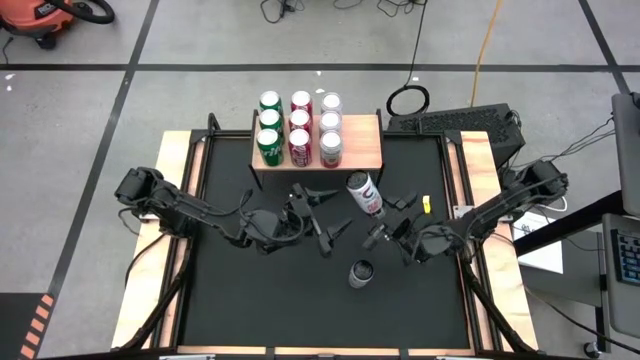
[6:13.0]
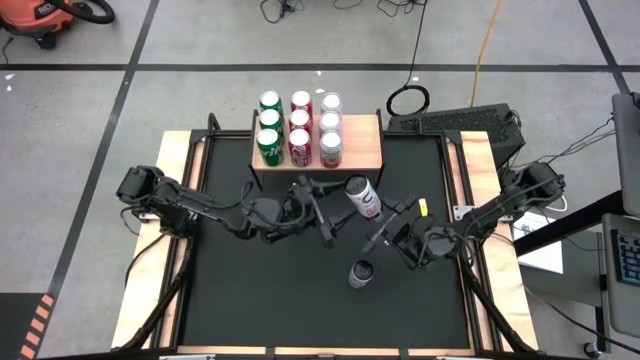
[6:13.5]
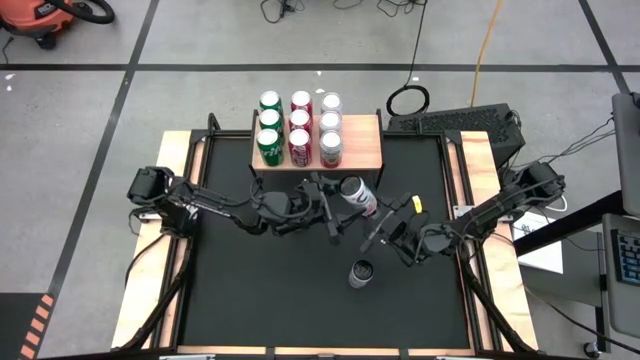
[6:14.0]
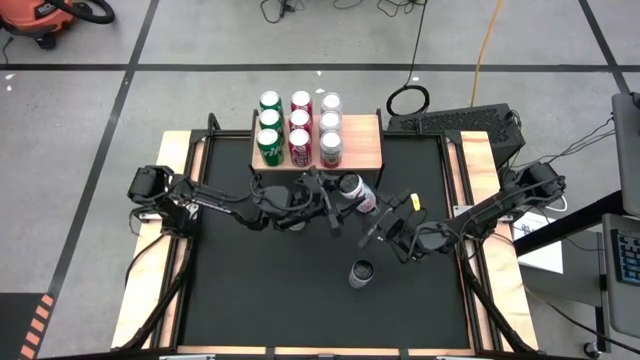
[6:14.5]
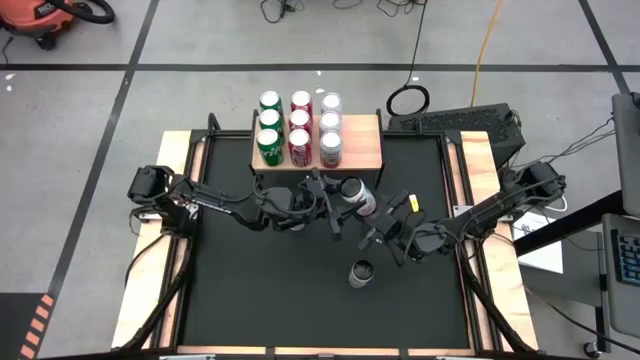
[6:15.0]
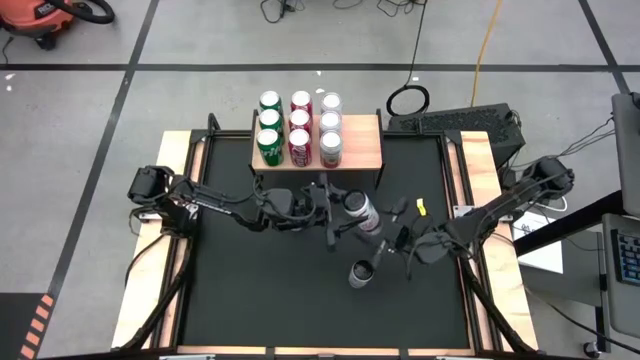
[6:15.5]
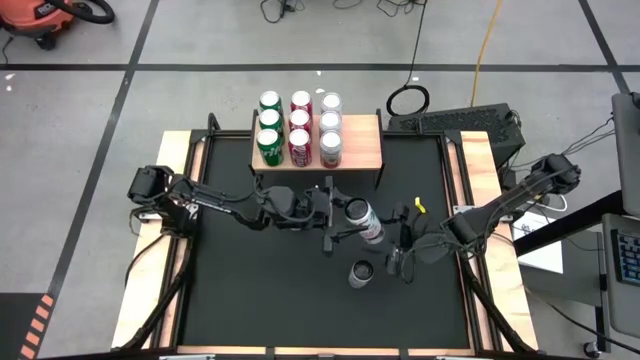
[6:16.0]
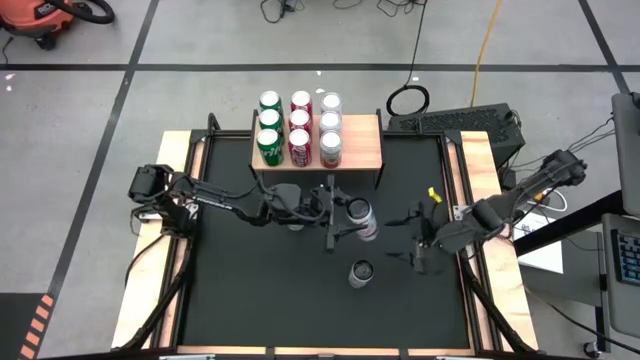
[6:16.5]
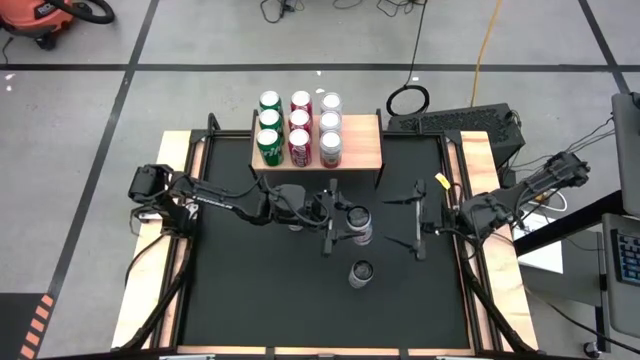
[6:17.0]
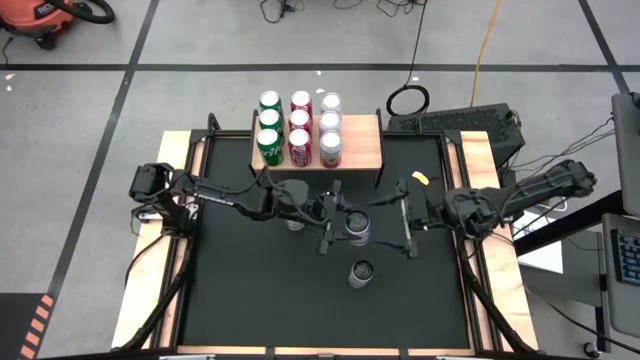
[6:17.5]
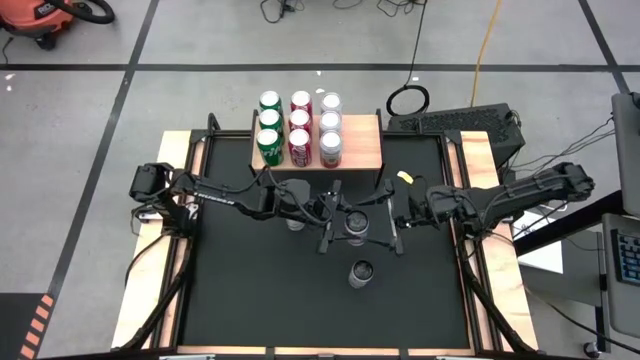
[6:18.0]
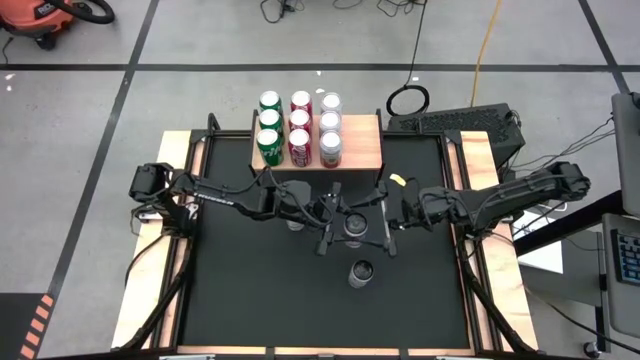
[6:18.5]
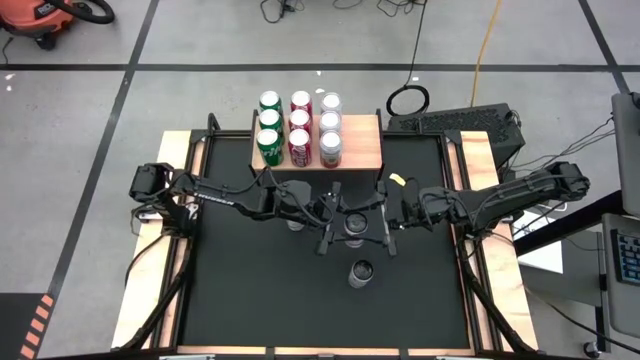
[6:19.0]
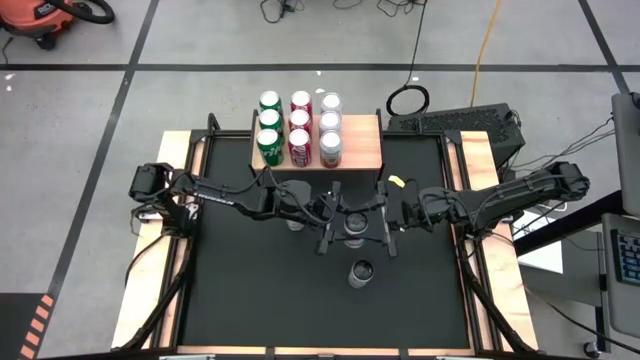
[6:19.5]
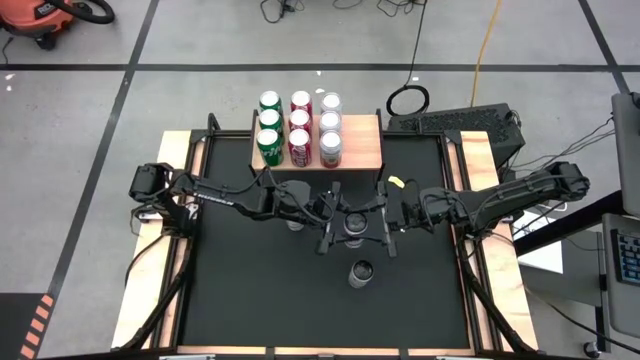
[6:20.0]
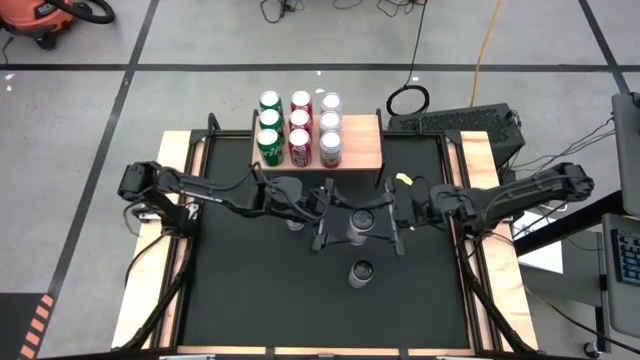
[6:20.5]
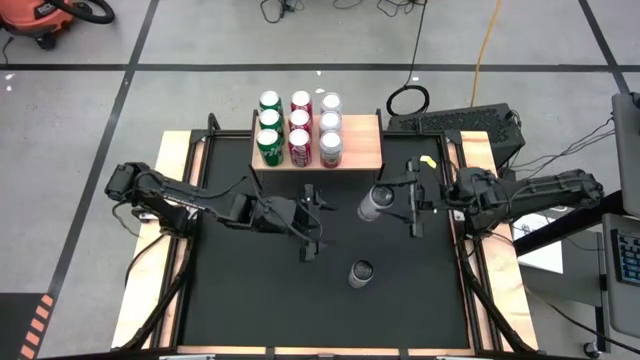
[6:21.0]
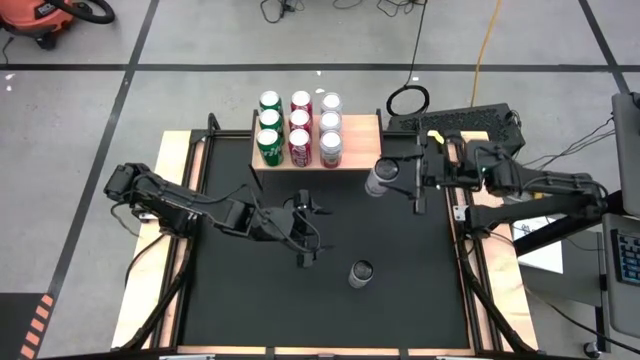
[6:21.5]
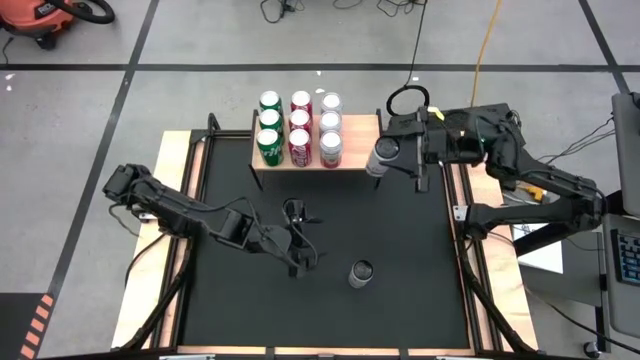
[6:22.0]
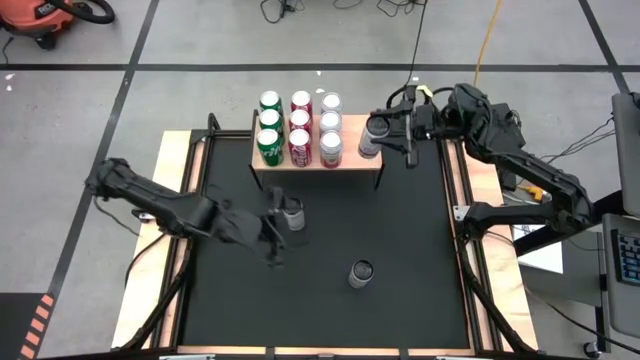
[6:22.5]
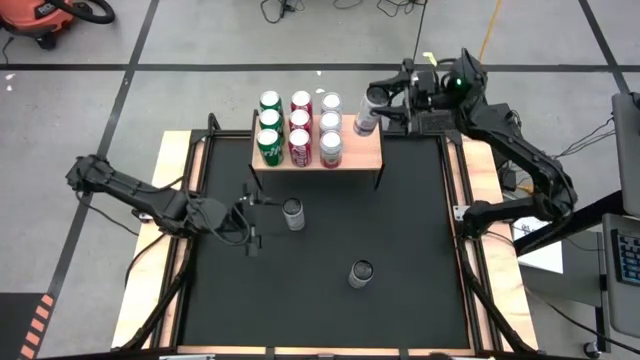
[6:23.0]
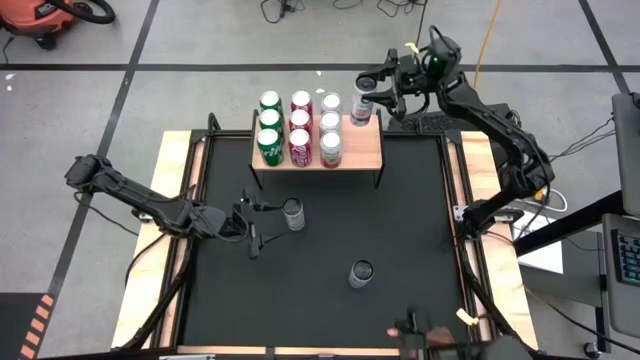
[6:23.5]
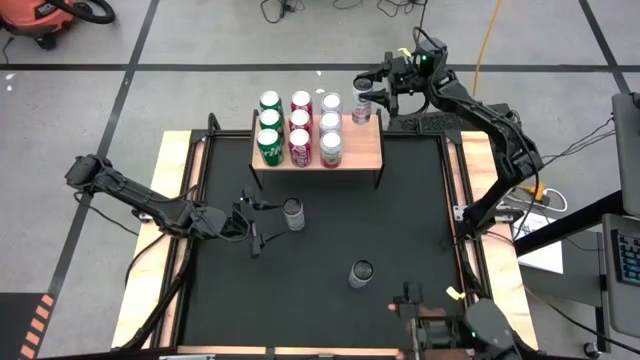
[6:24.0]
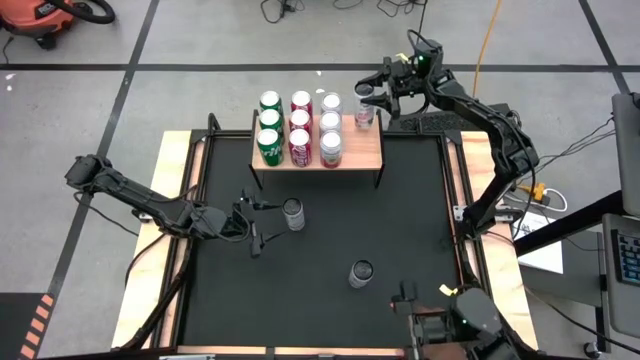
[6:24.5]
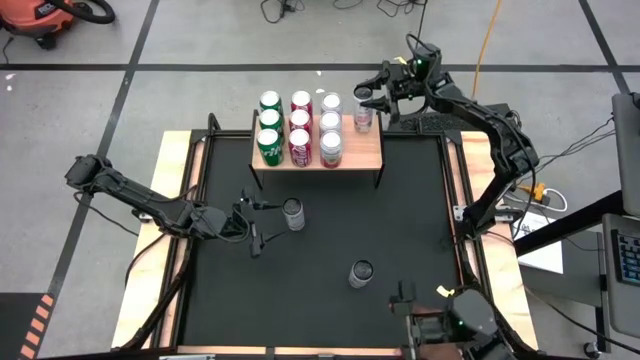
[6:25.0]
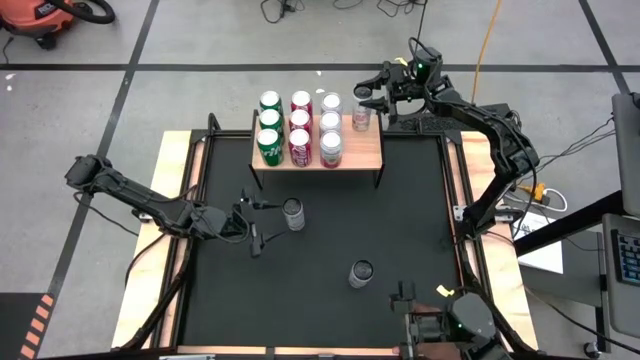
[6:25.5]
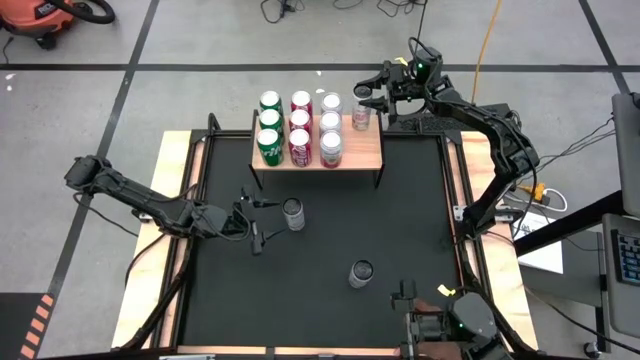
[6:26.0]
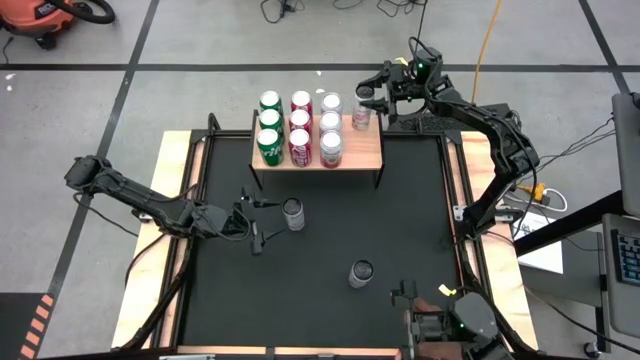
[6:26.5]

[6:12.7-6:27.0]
Task: Place canned beverage on shelf
Put the top white soda can on the shelf

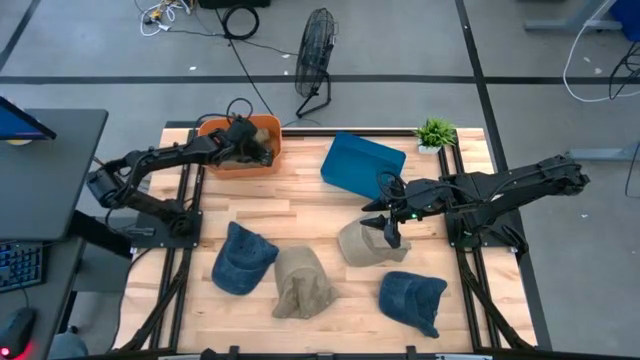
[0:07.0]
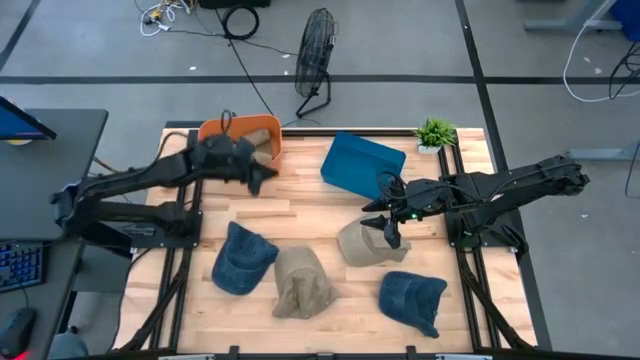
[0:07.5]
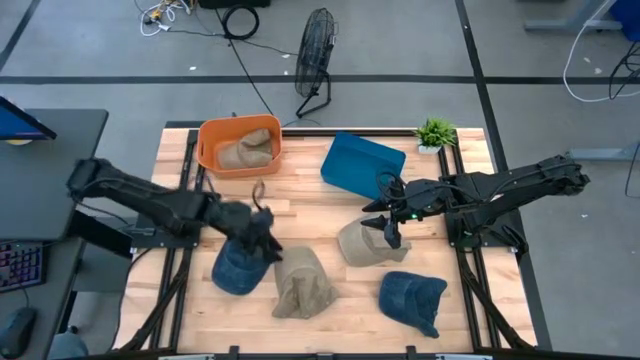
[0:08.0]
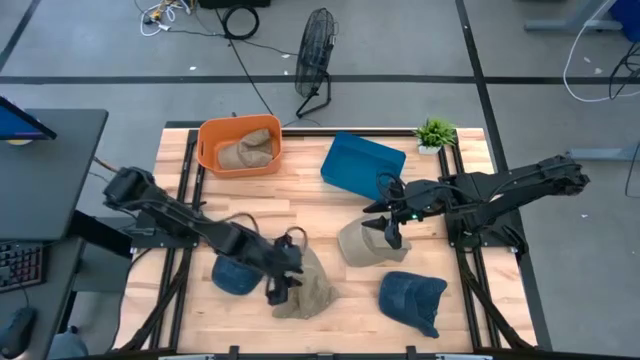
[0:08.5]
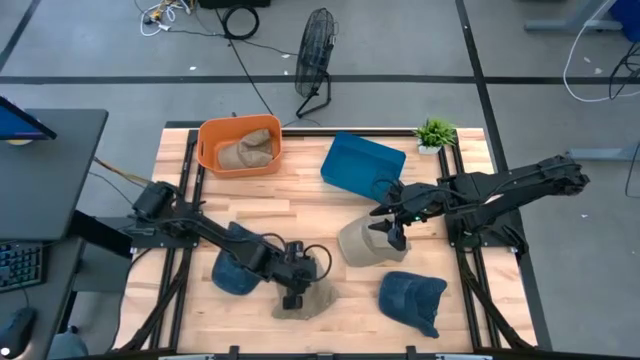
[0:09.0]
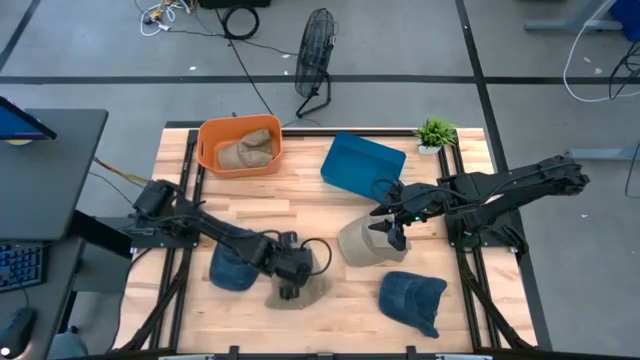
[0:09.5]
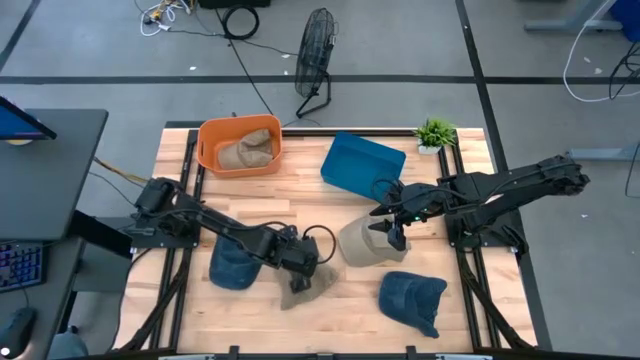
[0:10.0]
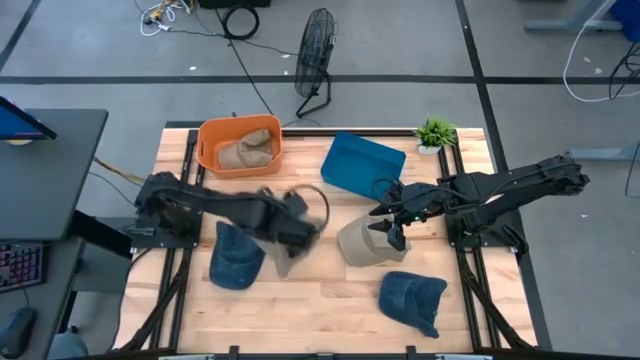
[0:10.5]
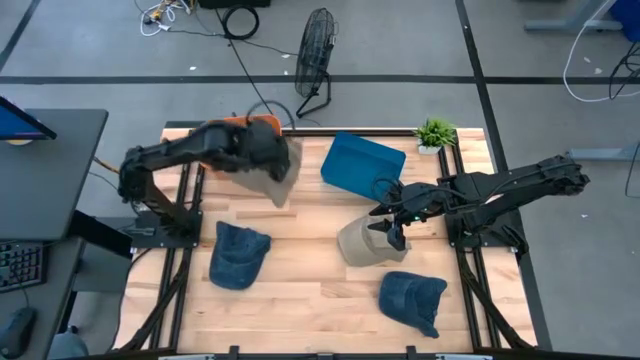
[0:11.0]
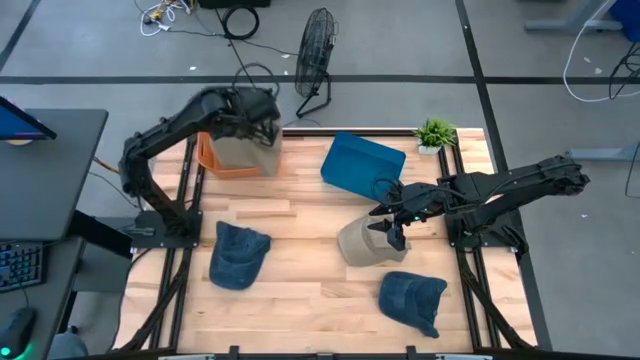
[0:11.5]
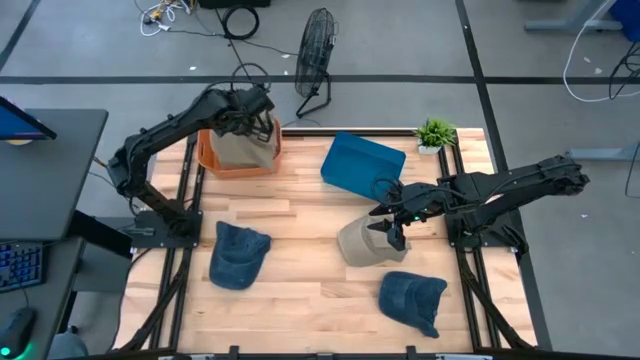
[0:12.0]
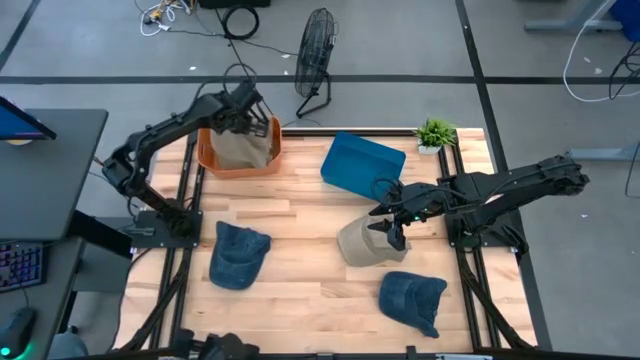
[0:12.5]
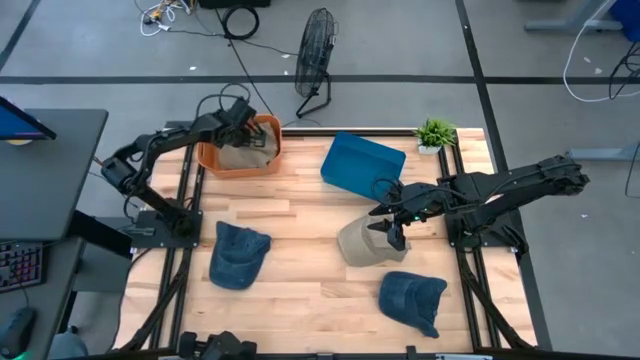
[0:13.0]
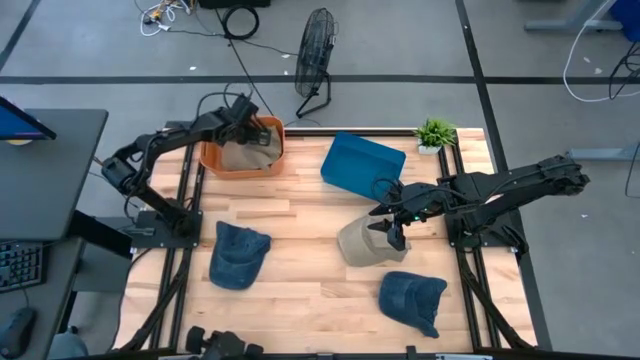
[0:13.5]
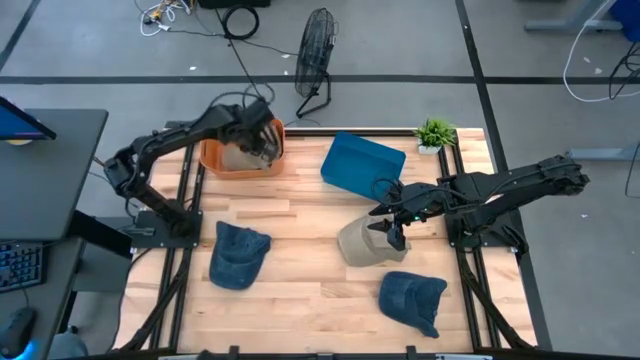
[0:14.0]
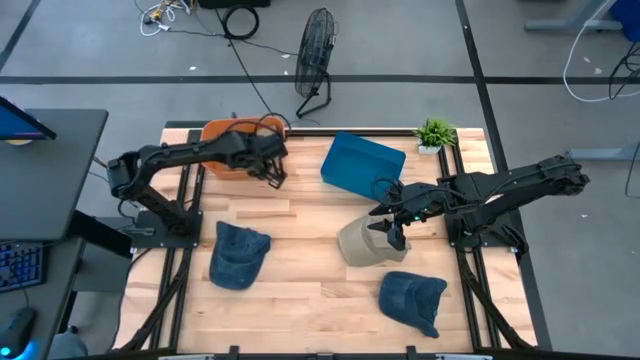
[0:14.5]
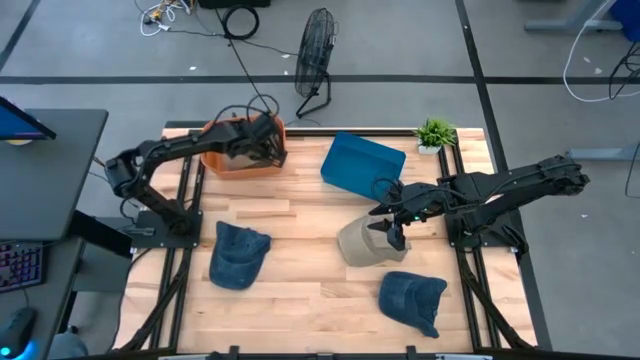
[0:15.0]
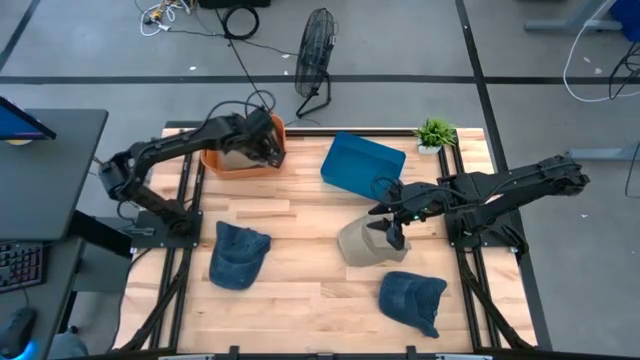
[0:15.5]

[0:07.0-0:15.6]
Task: Pick & Place hat
Put the bottom brown cap into the orange bin
